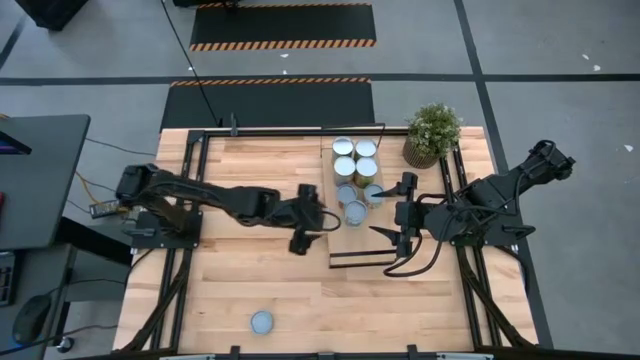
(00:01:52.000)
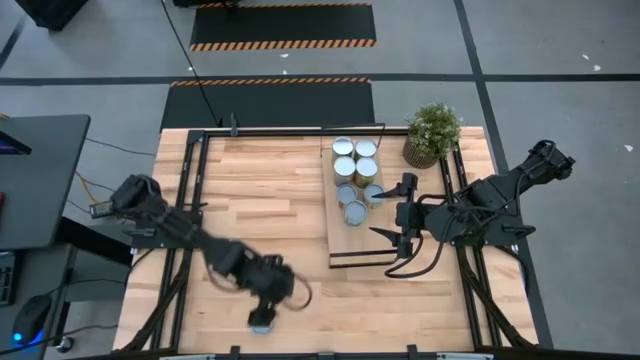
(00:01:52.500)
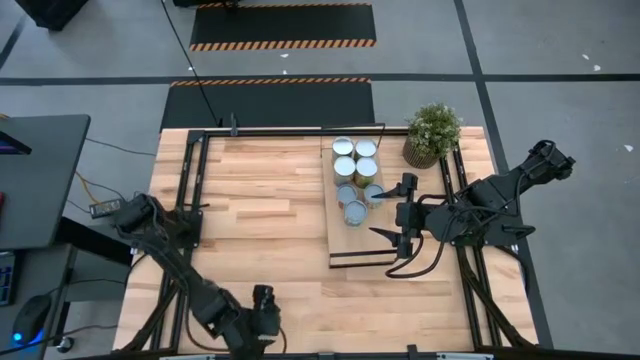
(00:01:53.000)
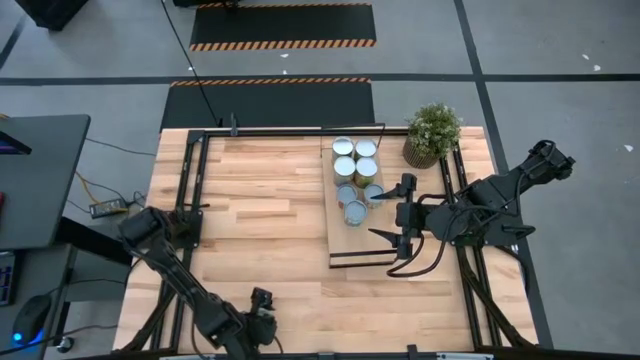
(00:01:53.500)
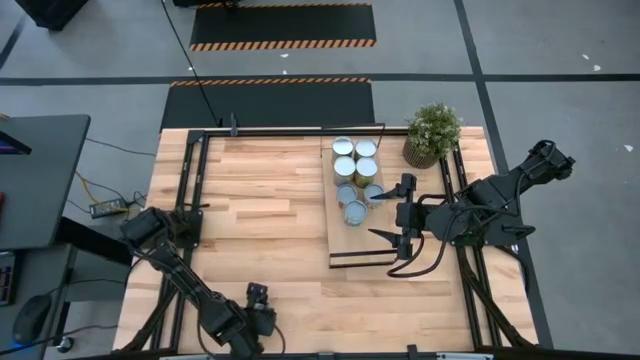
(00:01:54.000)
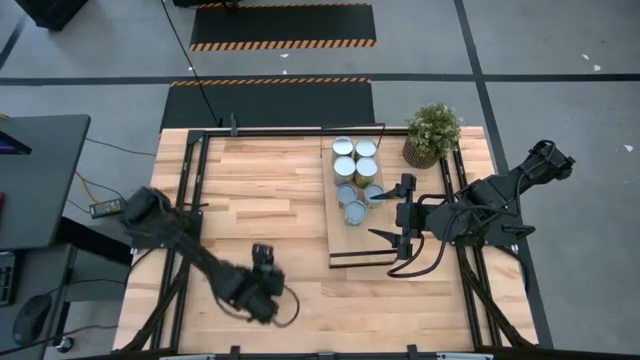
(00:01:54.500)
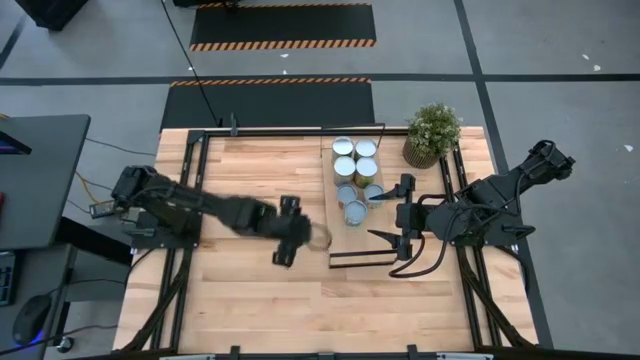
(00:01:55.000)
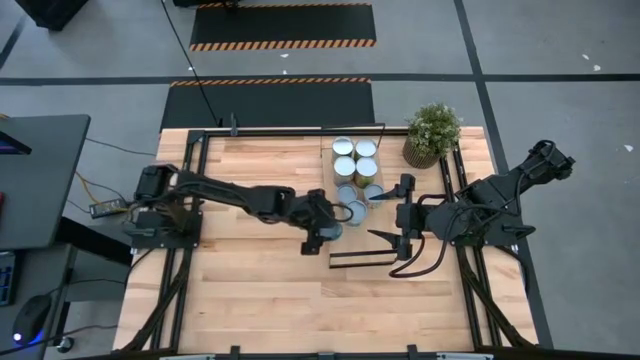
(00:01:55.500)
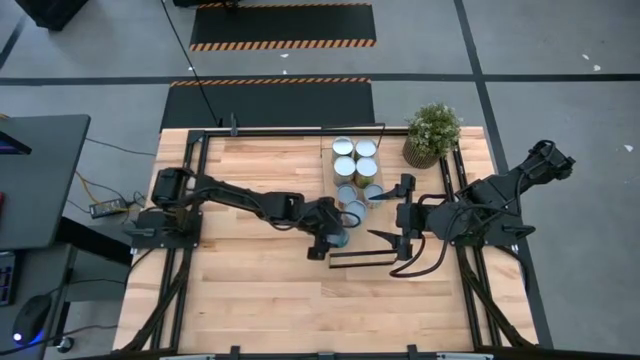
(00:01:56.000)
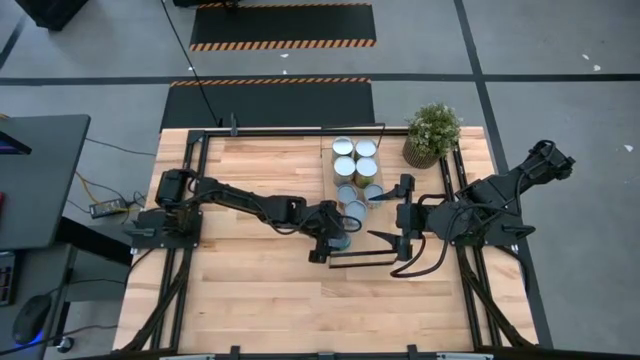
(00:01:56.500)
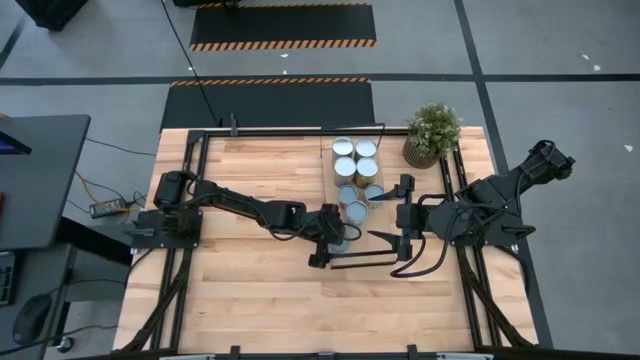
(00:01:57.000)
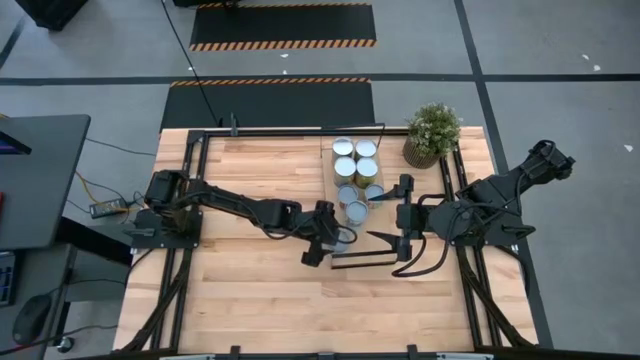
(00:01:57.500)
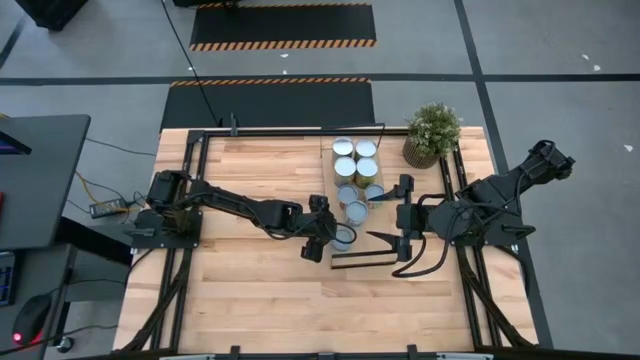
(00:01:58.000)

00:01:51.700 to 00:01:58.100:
Task: Pick and place cans onto a shelf
Put the canned tuna on the shelf

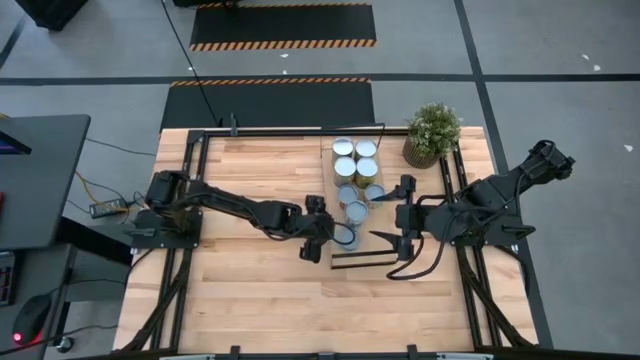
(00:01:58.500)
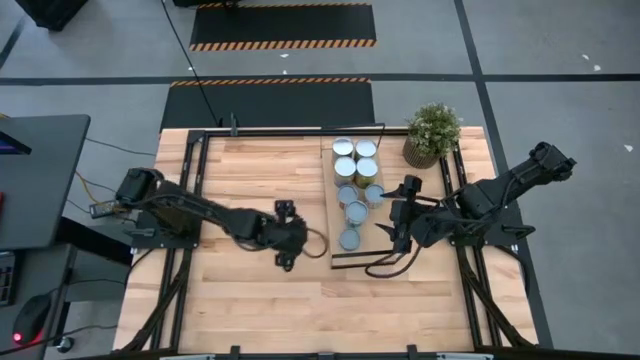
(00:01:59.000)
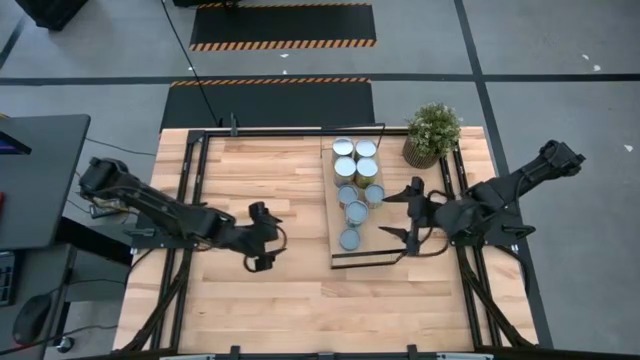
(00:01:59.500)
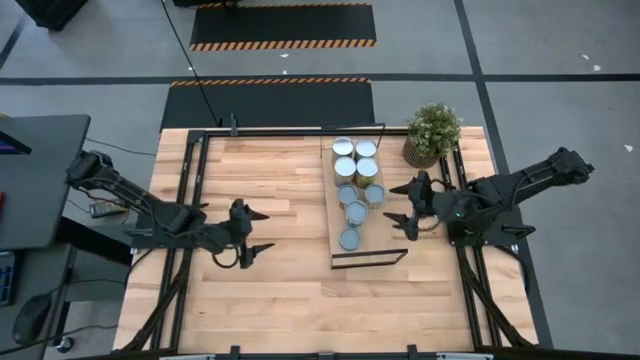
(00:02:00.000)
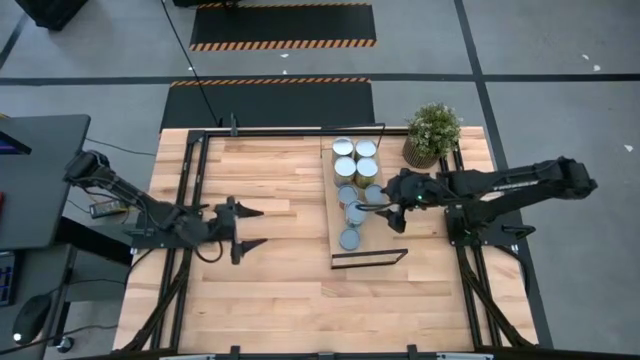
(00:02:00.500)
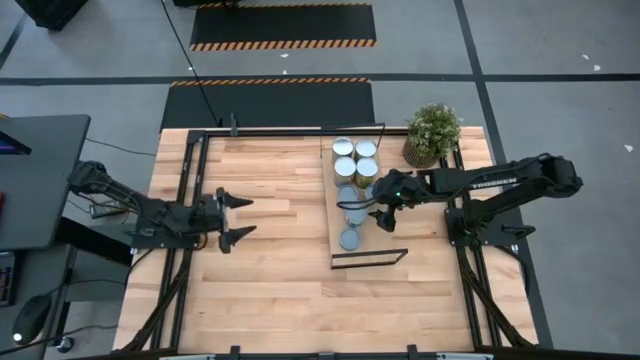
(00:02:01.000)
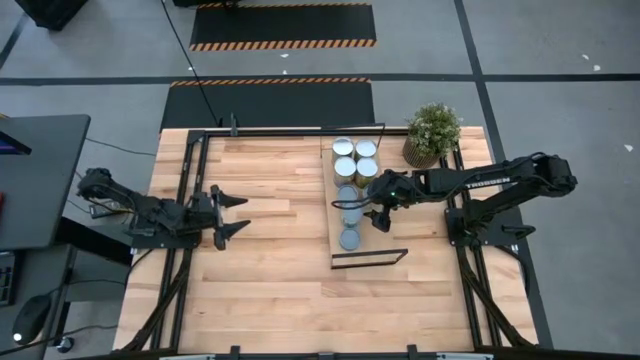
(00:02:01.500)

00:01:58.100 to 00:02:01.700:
Adjust the cans on the shelf

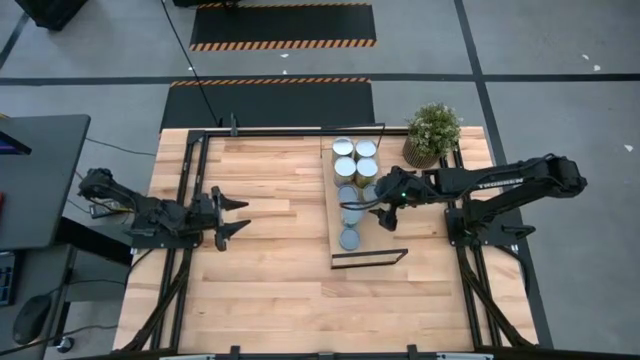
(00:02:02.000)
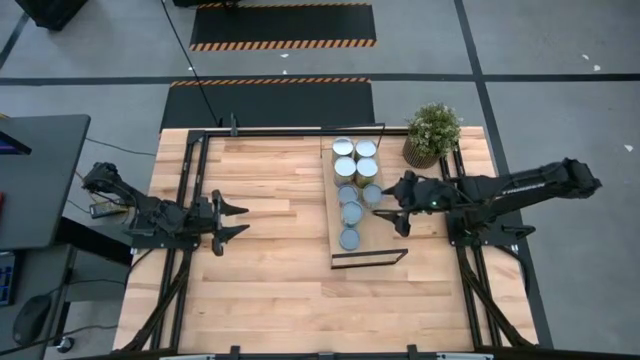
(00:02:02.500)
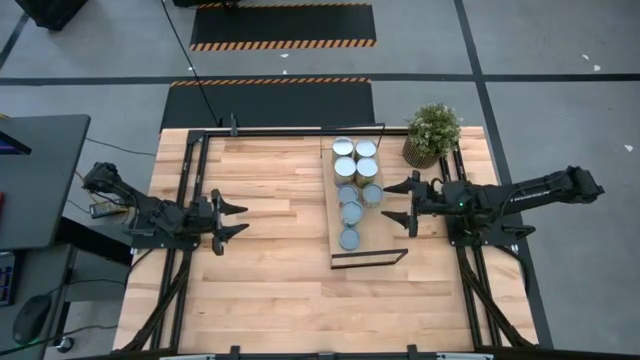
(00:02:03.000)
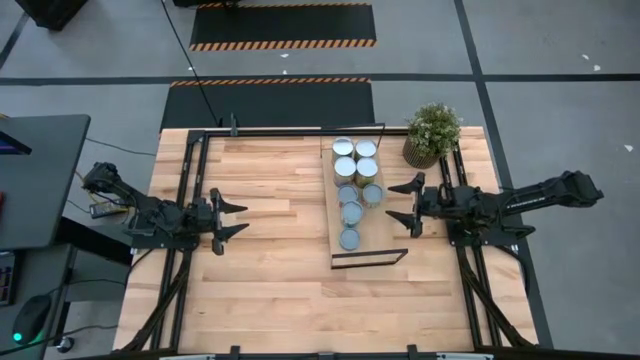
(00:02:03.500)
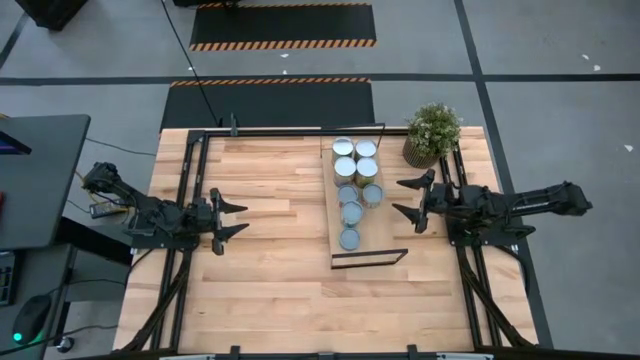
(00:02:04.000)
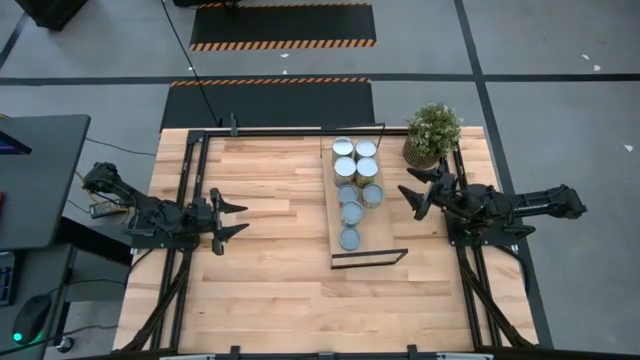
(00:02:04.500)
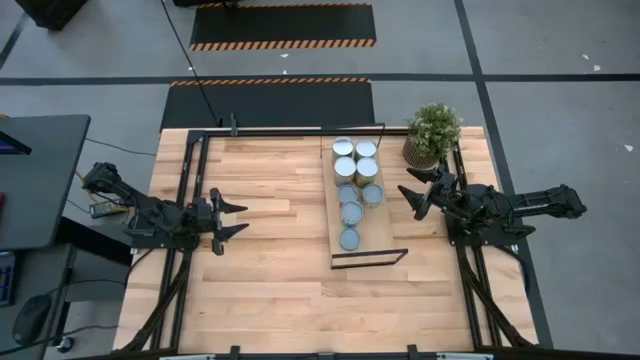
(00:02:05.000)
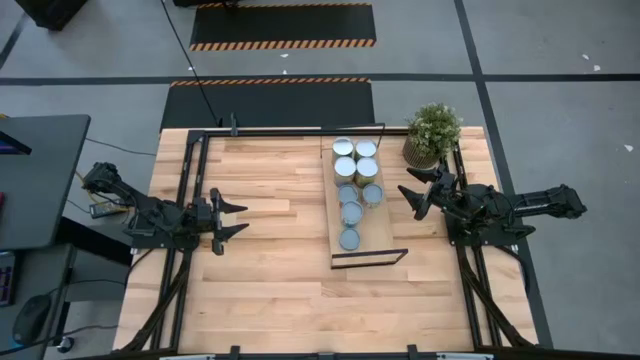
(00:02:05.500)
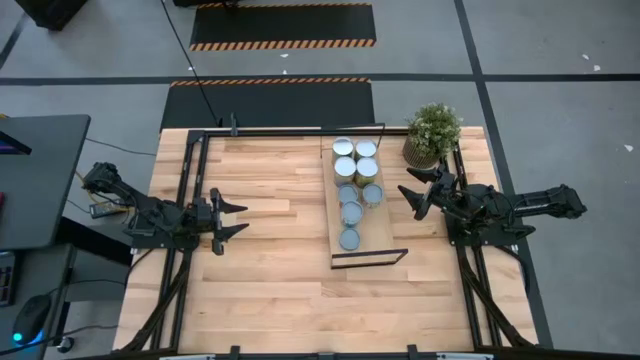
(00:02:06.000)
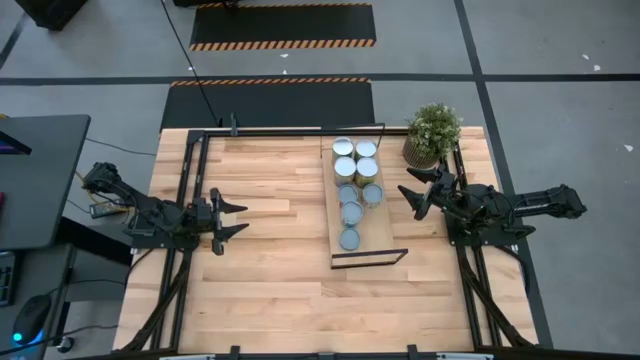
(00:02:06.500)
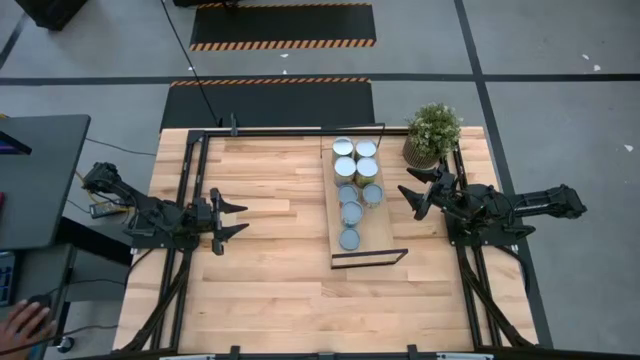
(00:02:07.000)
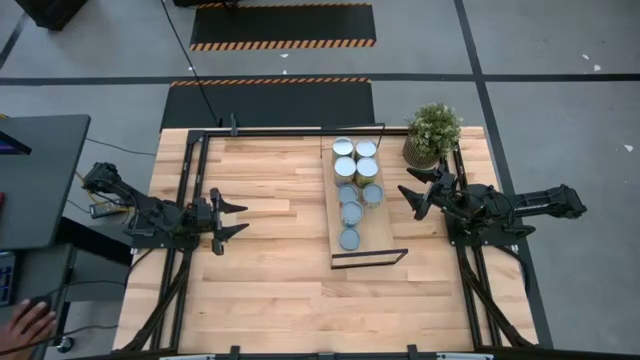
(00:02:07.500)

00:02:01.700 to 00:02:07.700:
Return to Home Position
